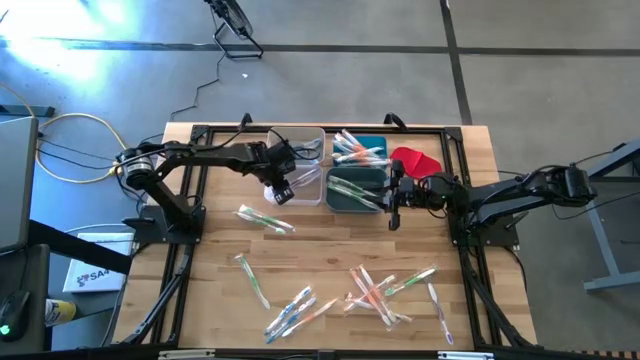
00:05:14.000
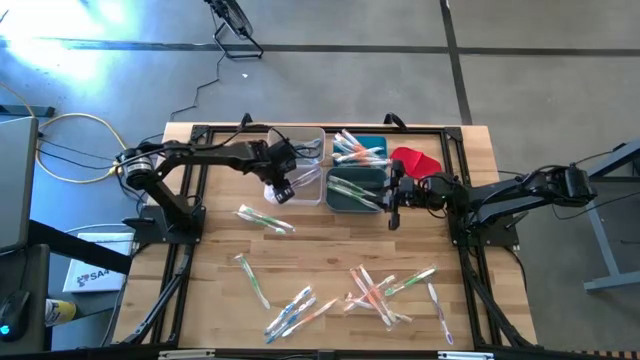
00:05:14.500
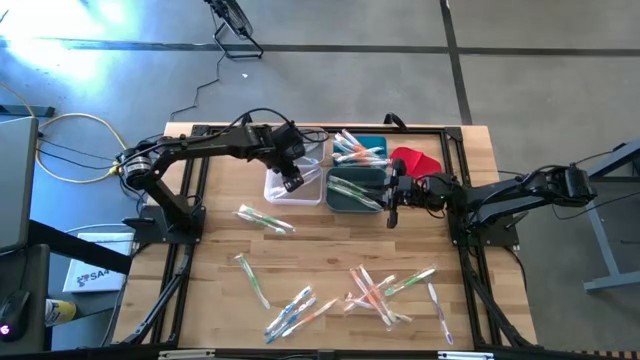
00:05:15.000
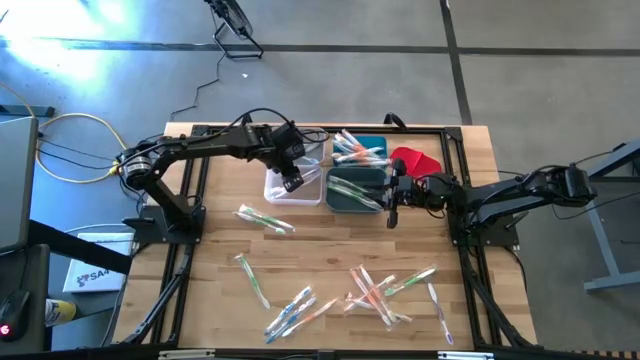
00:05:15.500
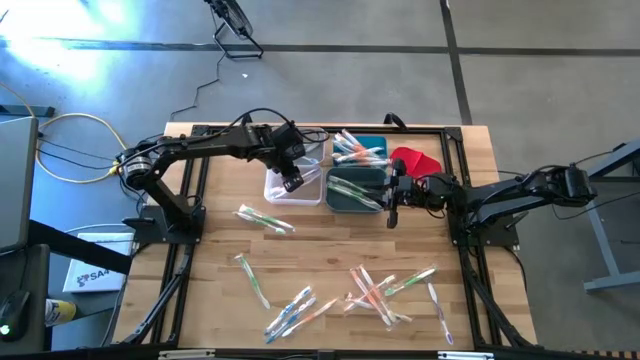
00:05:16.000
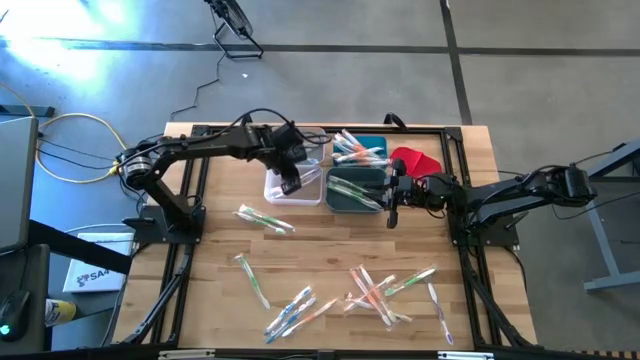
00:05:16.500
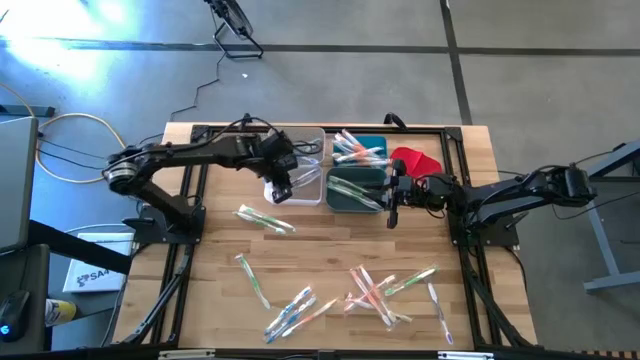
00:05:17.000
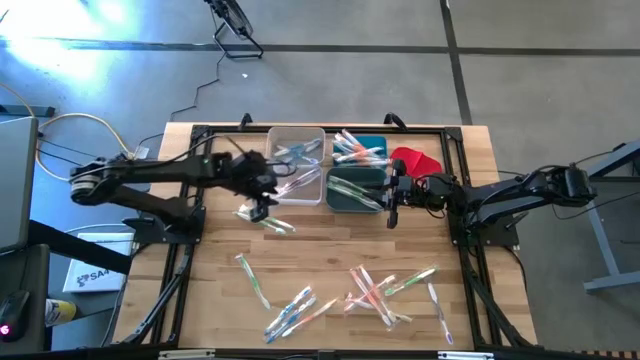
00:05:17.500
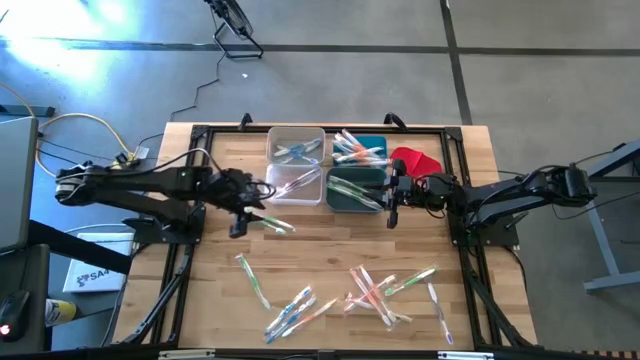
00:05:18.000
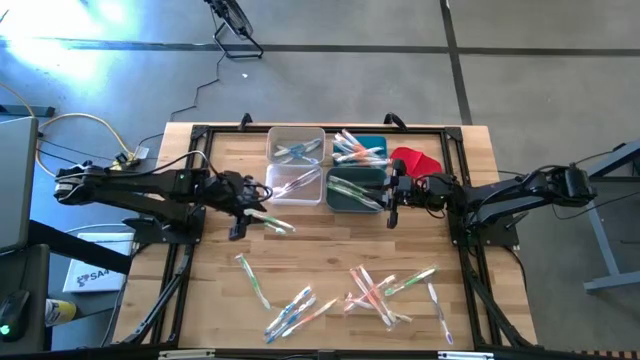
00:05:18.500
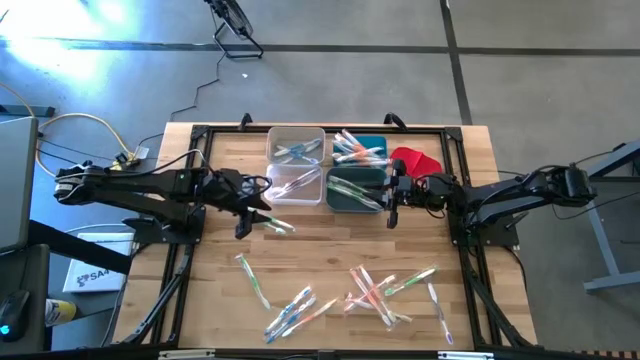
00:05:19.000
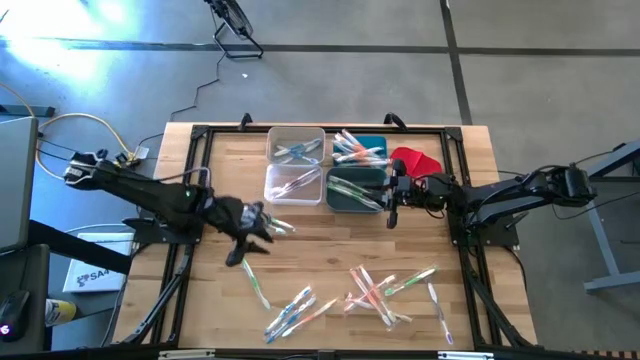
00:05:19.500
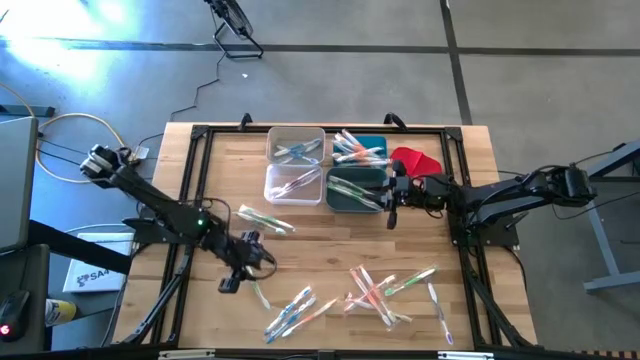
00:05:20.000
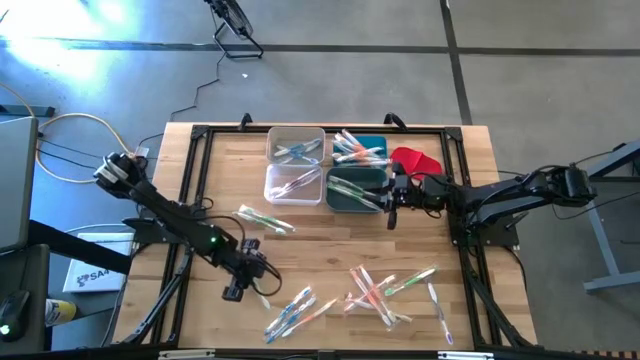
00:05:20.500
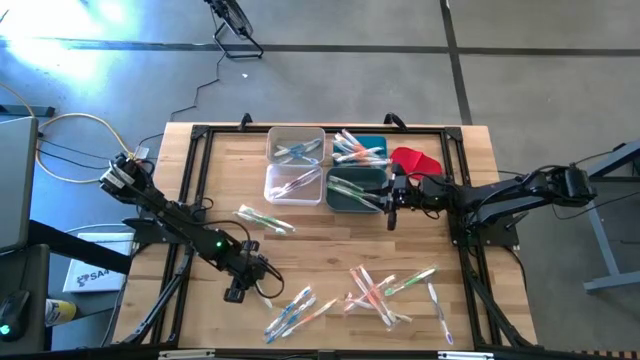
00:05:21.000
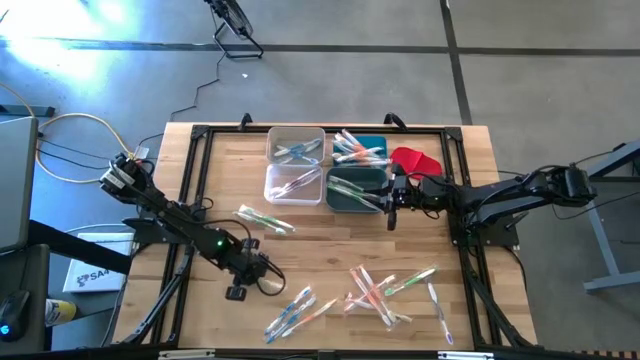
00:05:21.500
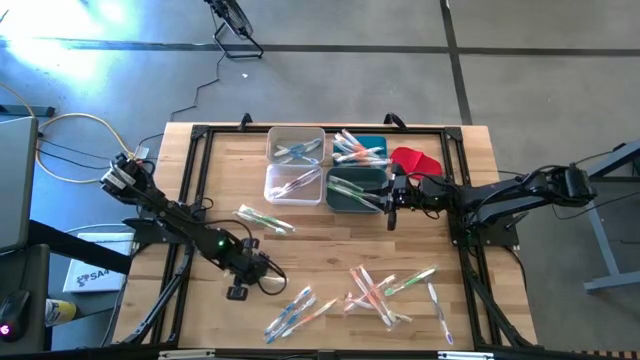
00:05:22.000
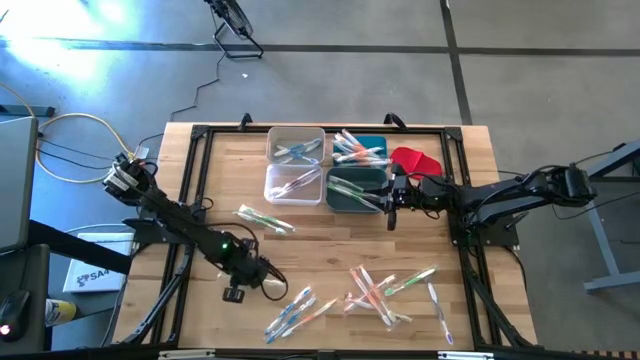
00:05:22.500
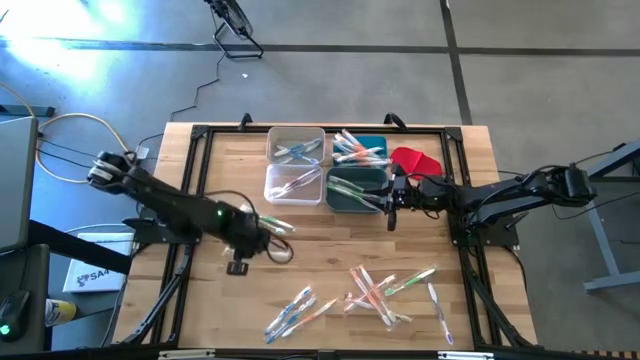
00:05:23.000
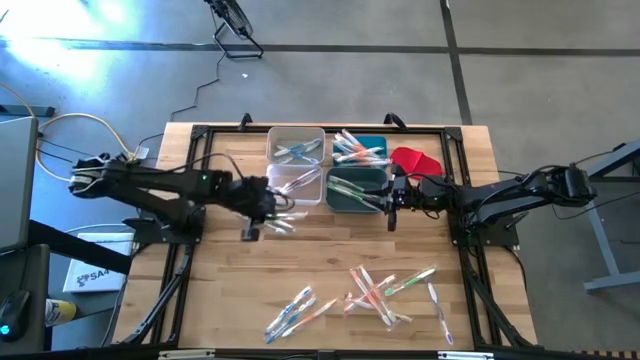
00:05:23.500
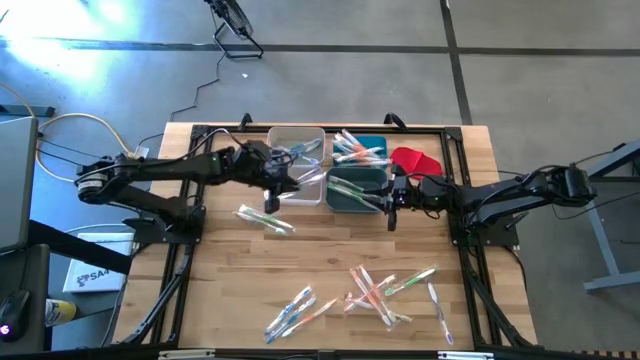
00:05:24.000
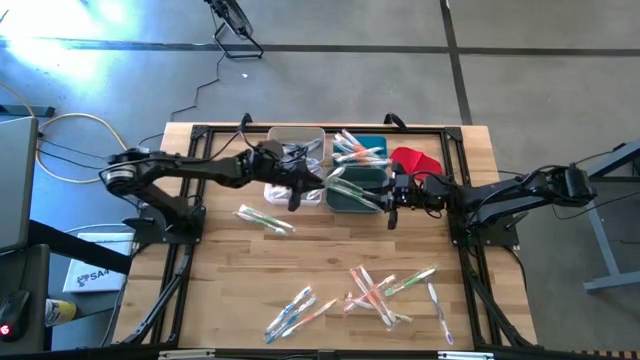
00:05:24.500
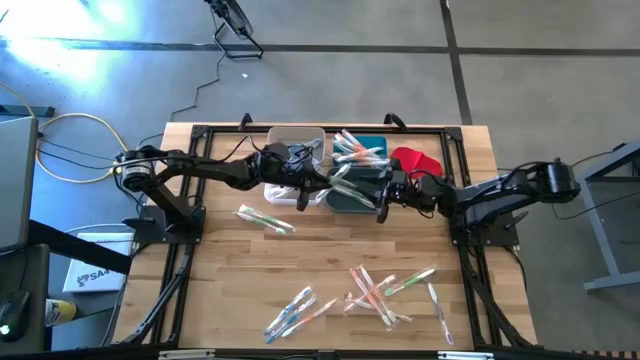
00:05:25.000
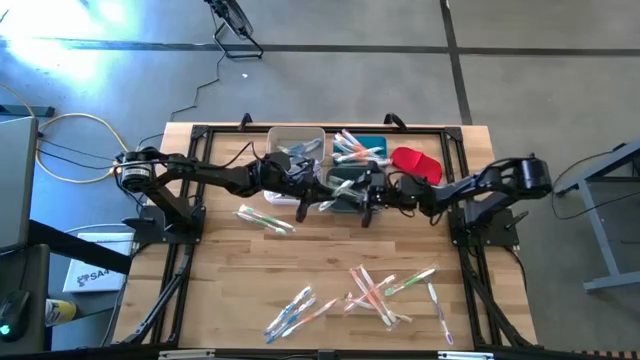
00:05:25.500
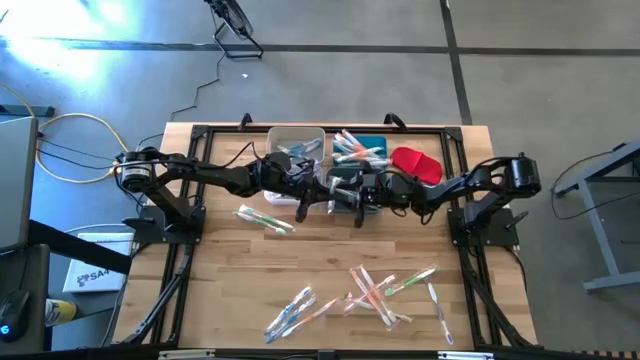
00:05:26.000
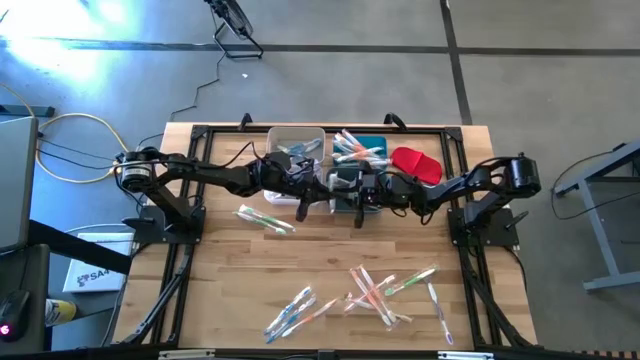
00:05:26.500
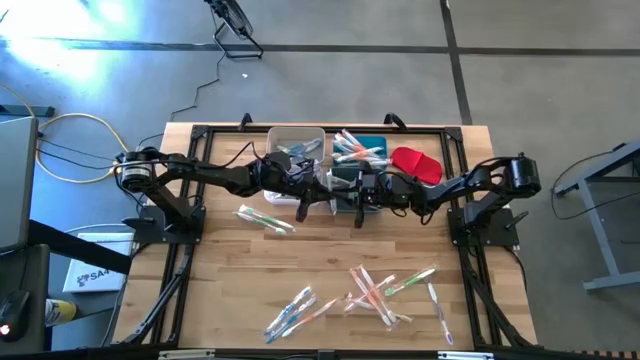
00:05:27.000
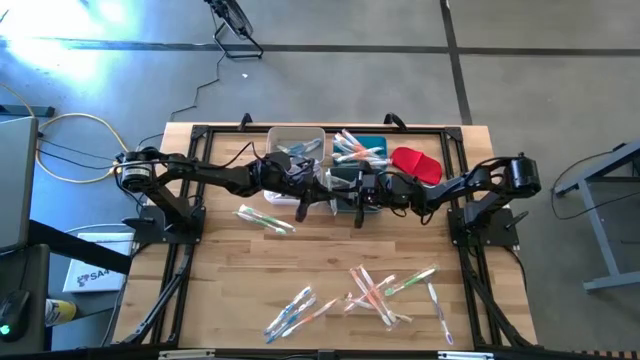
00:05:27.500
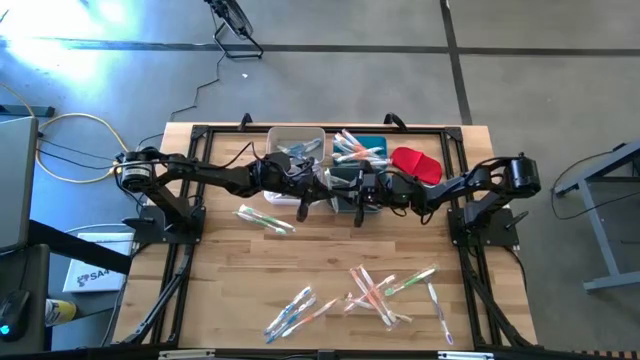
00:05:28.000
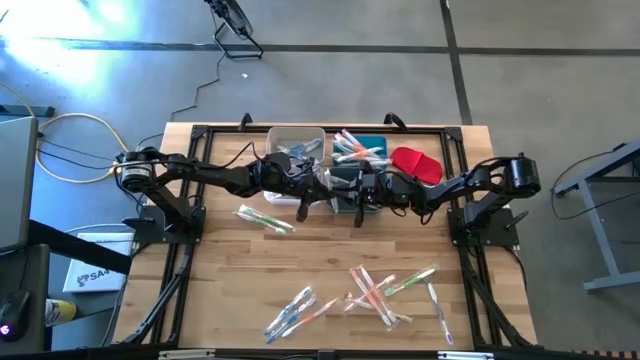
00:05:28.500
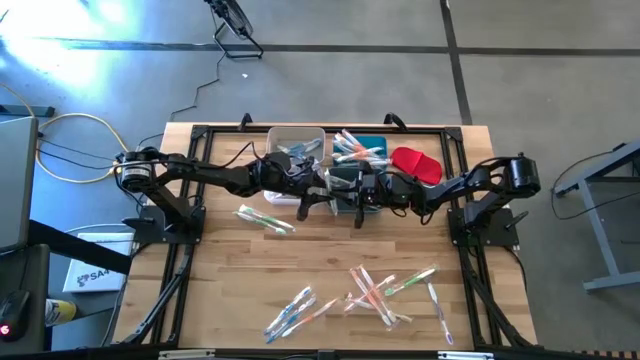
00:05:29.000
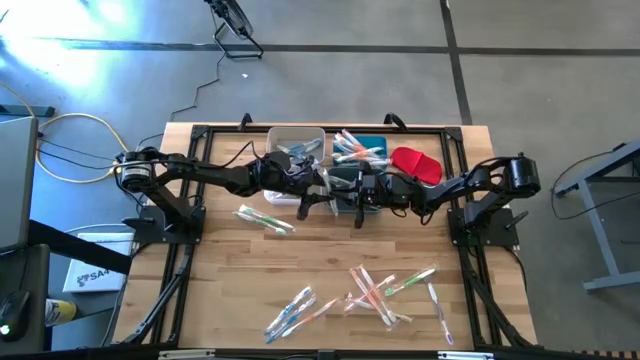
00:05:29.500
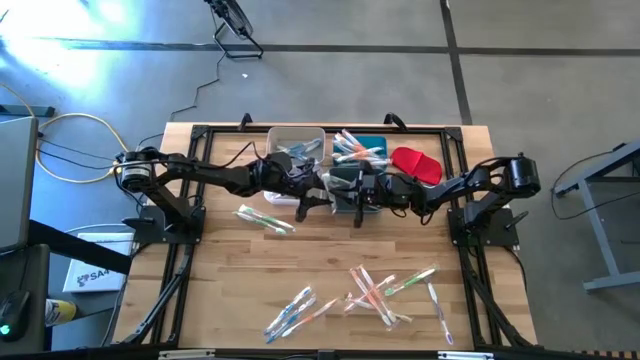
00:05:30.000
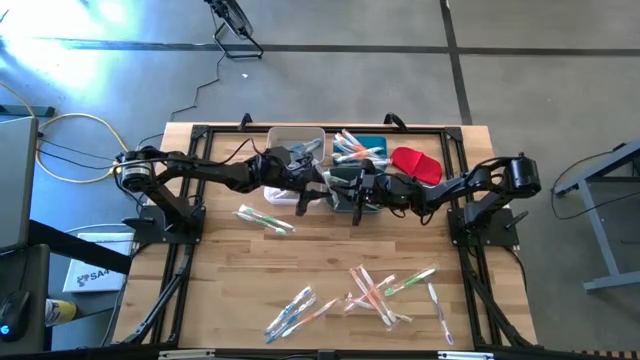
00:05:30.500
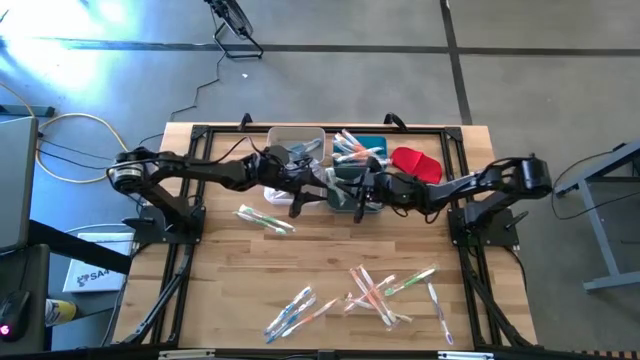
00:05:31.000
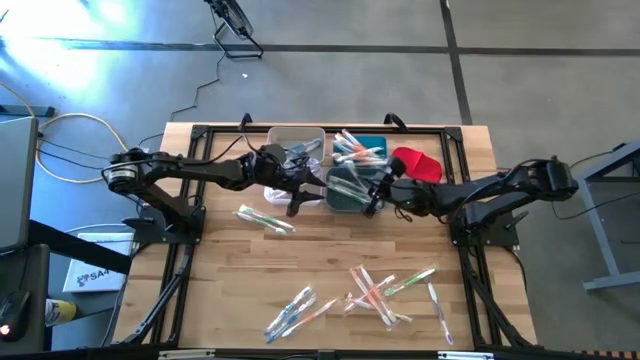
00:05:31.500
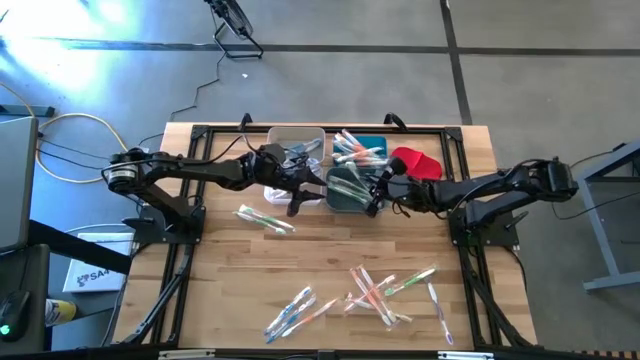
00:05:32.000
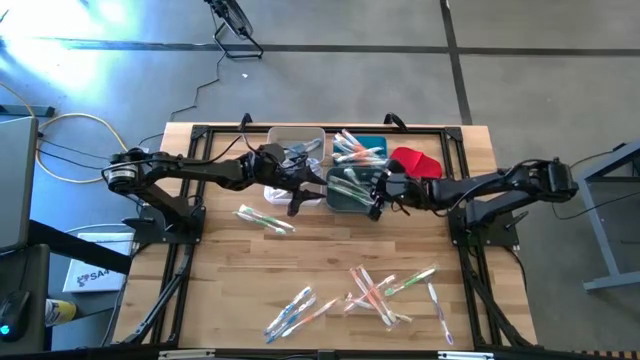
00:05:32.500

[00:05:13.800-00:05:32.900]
Task: Pick & Place Toothbrushes
Put the green toothbrush into the green bin

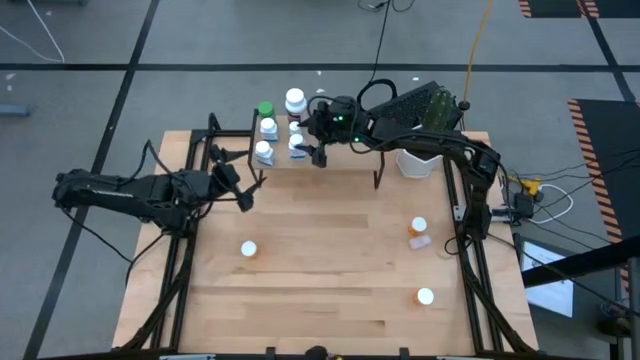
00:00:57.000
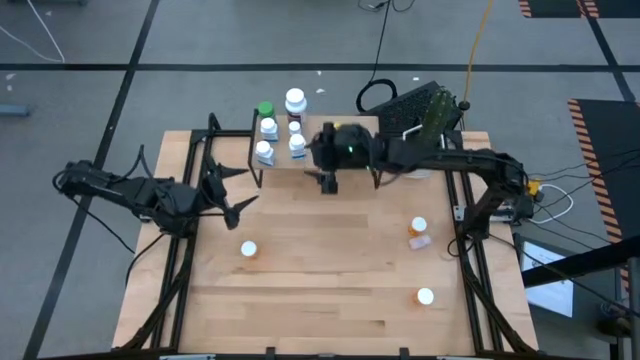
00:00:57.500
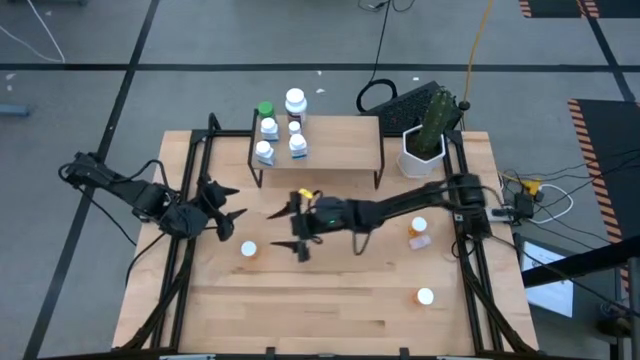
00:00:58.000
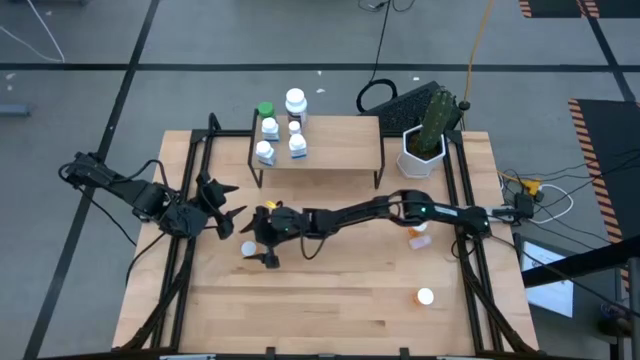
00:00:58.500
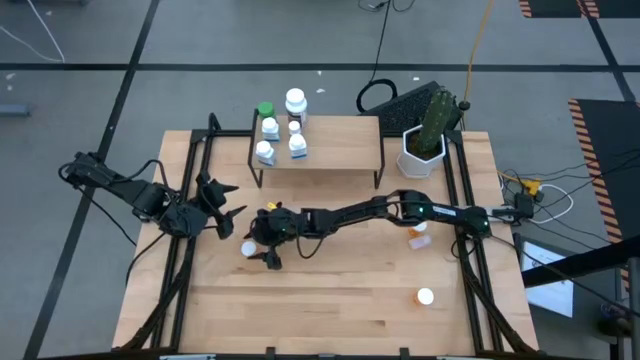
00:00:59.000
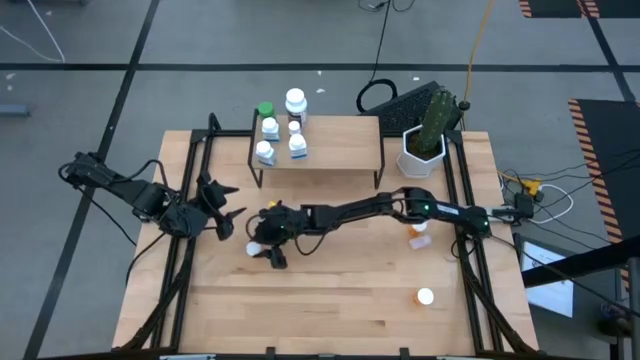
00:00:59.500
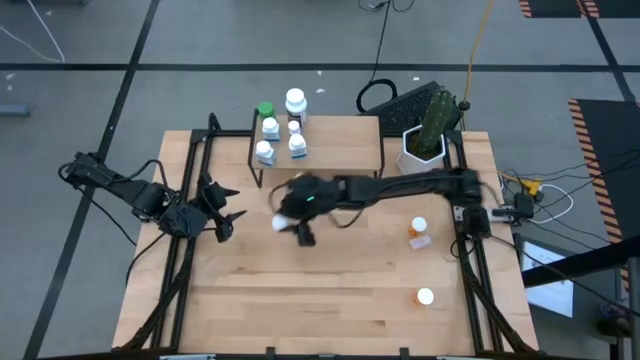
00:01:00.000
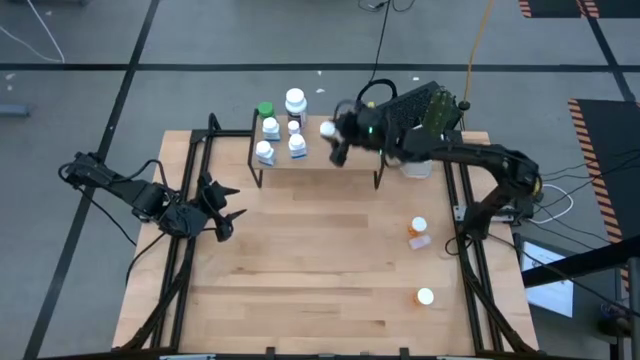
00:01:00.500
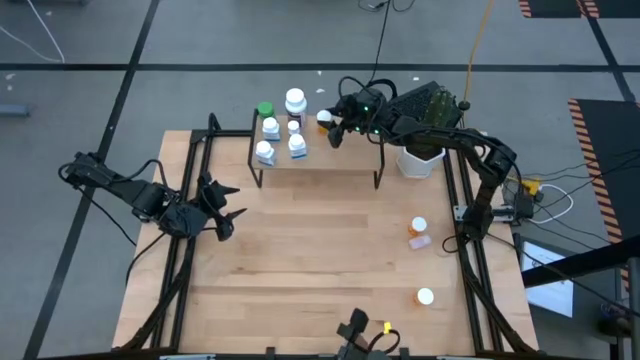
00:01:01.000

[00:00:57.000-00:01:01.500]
Task: Pick and place medicine bottles onto shelf by color
Put the top left orange pill bottle on the shelf
